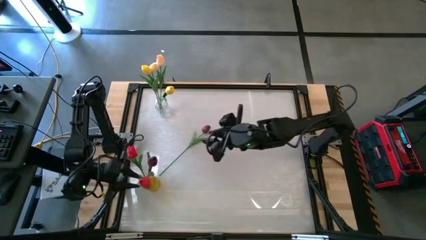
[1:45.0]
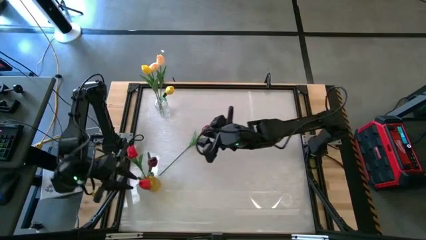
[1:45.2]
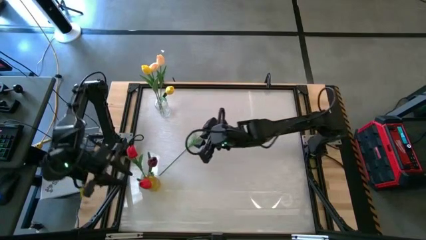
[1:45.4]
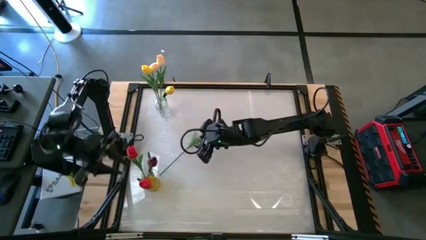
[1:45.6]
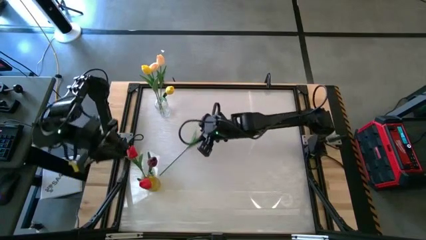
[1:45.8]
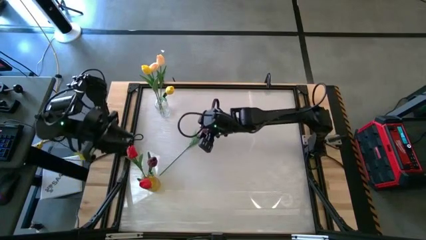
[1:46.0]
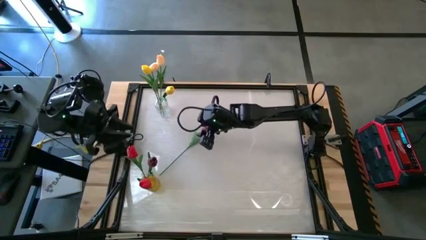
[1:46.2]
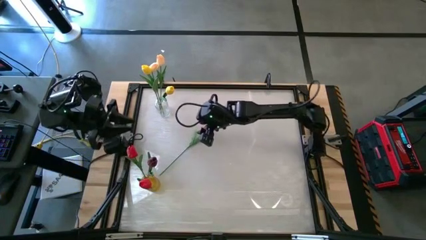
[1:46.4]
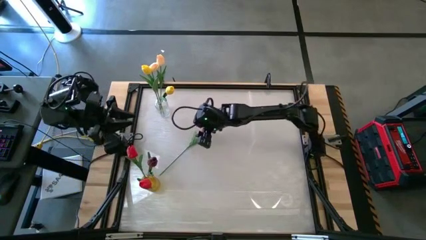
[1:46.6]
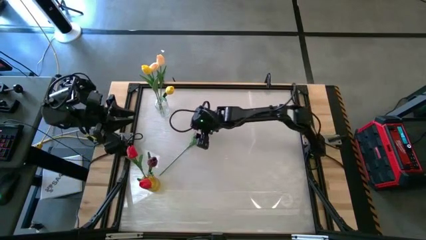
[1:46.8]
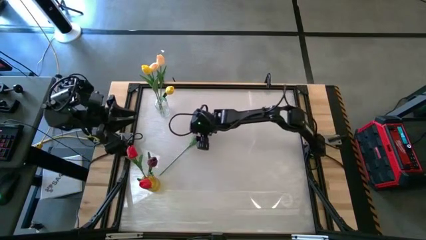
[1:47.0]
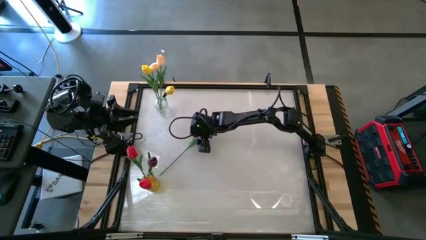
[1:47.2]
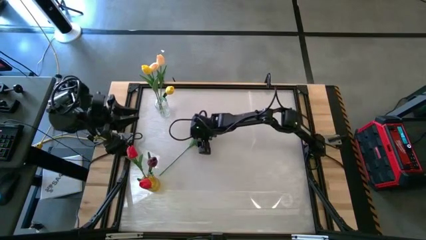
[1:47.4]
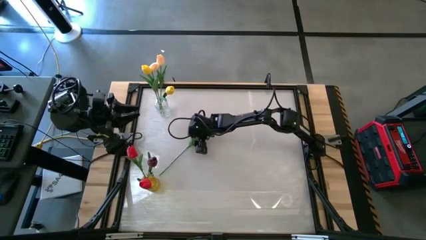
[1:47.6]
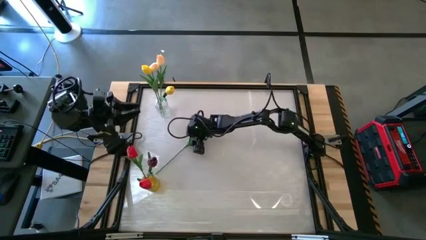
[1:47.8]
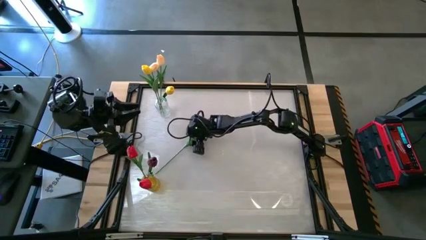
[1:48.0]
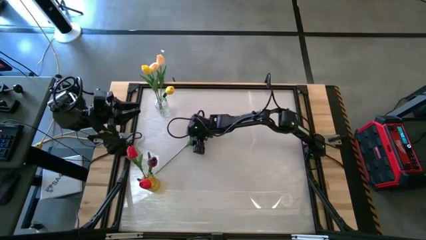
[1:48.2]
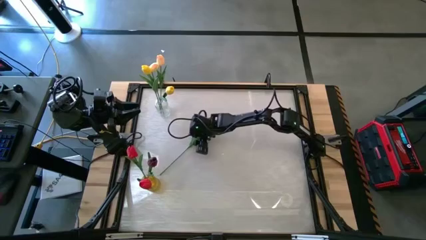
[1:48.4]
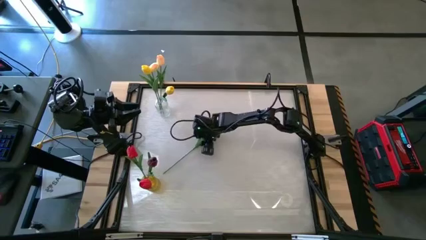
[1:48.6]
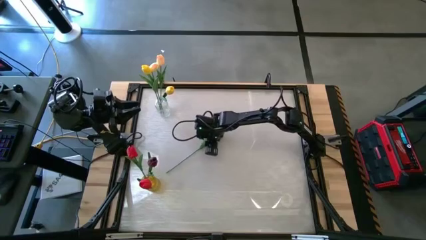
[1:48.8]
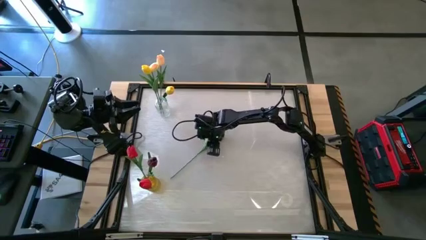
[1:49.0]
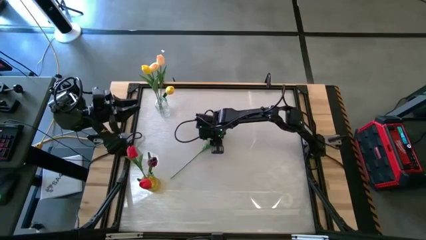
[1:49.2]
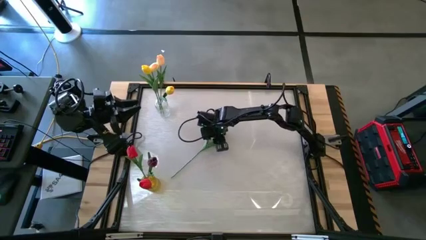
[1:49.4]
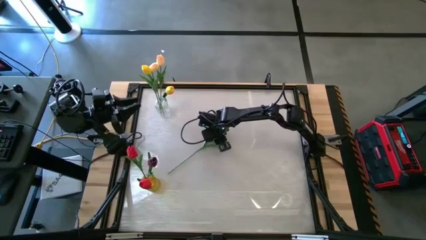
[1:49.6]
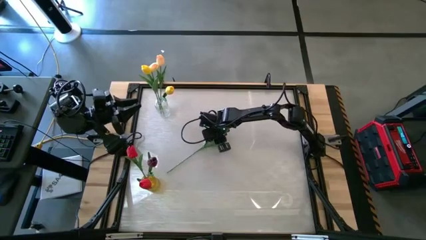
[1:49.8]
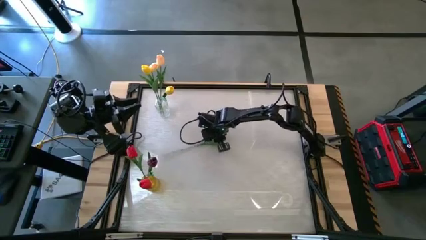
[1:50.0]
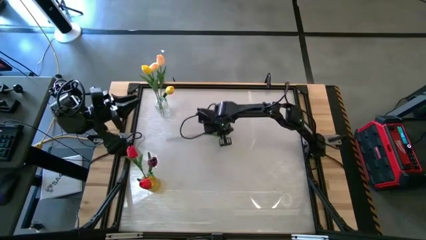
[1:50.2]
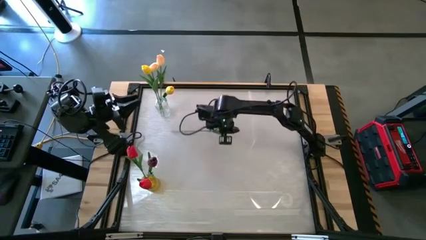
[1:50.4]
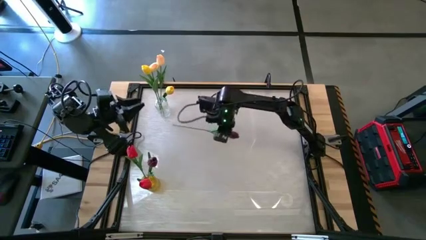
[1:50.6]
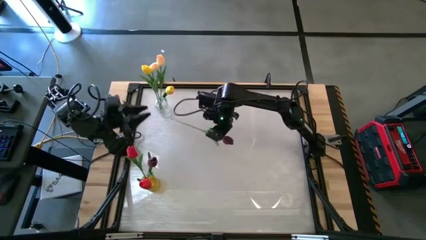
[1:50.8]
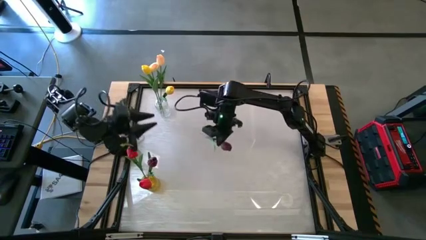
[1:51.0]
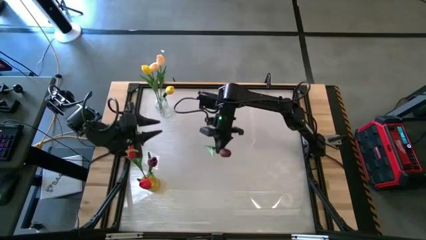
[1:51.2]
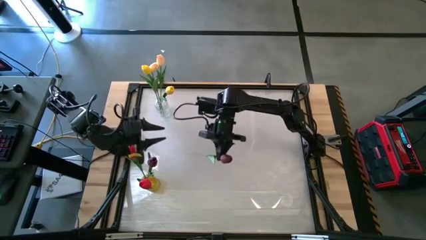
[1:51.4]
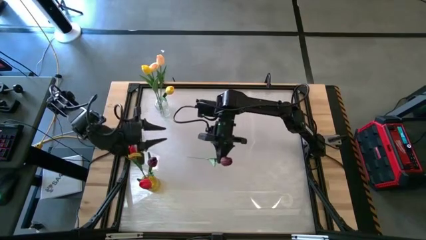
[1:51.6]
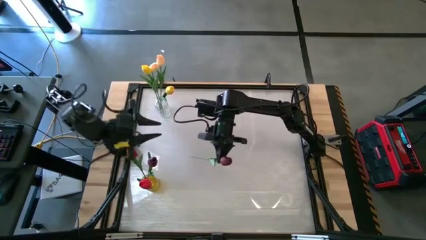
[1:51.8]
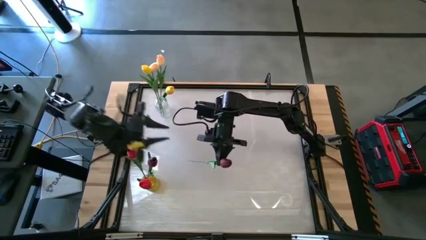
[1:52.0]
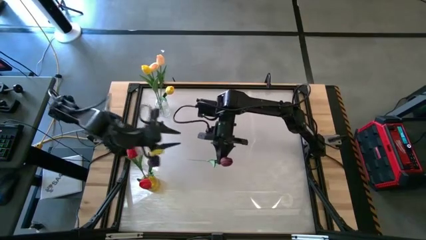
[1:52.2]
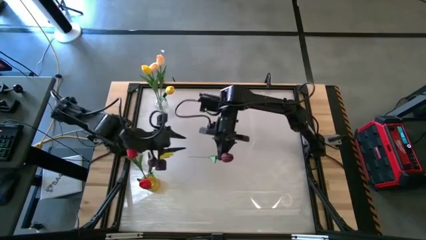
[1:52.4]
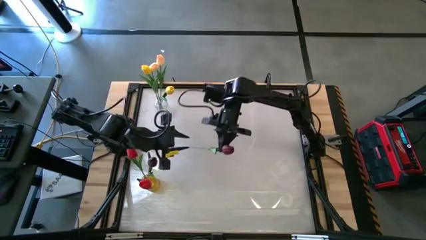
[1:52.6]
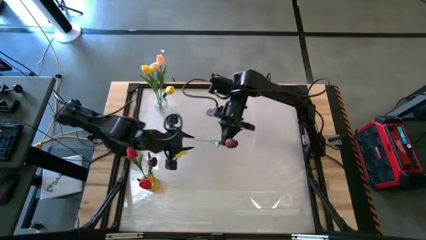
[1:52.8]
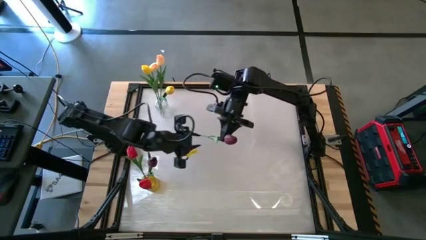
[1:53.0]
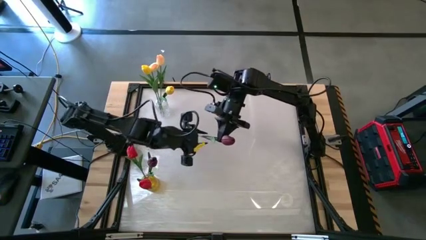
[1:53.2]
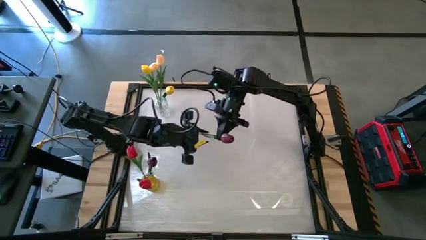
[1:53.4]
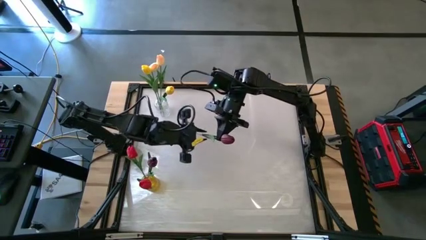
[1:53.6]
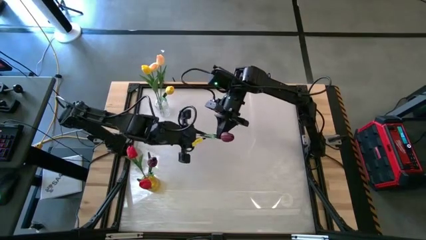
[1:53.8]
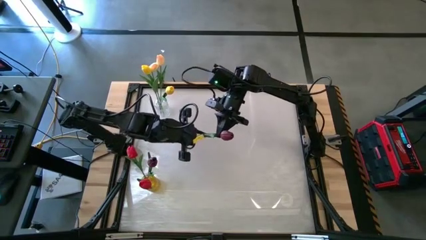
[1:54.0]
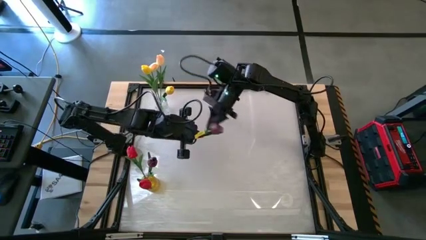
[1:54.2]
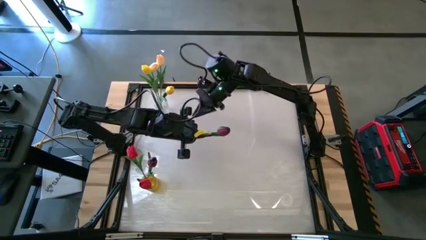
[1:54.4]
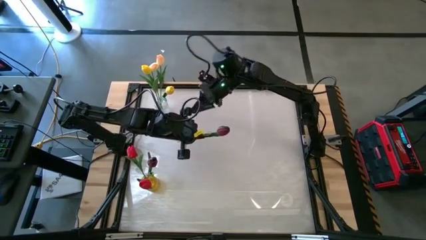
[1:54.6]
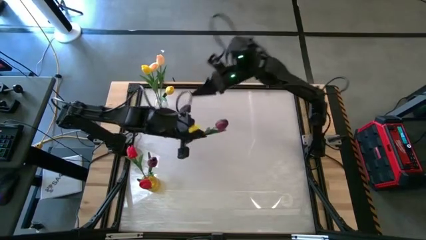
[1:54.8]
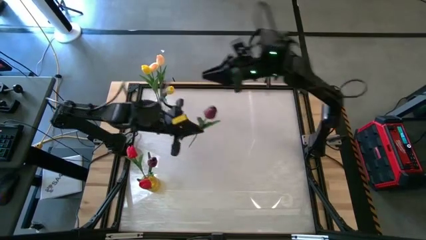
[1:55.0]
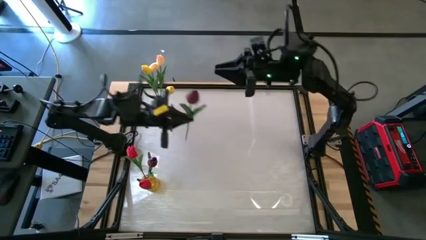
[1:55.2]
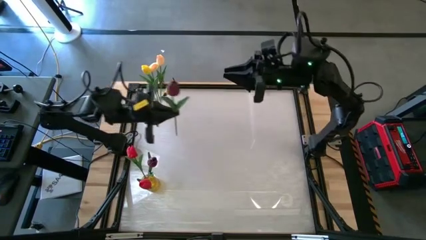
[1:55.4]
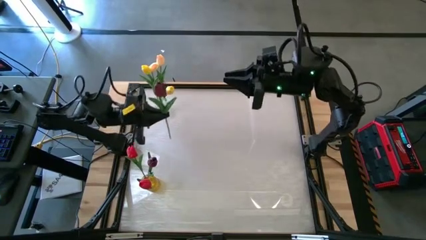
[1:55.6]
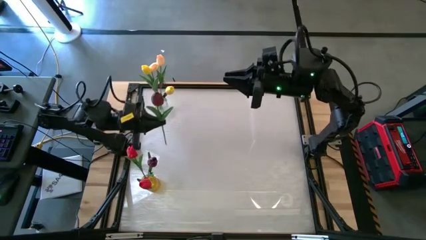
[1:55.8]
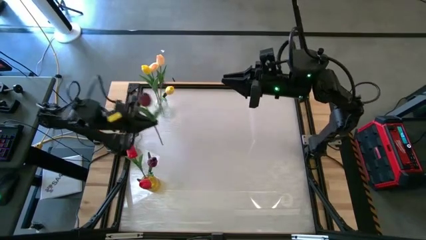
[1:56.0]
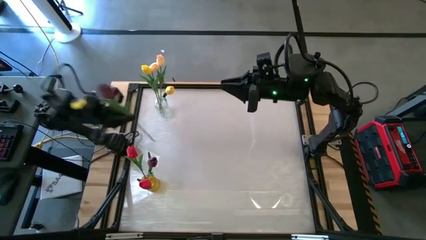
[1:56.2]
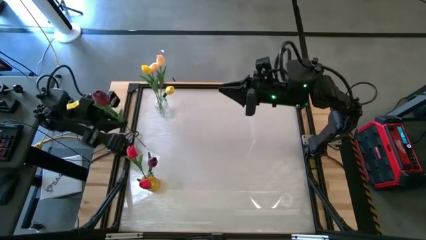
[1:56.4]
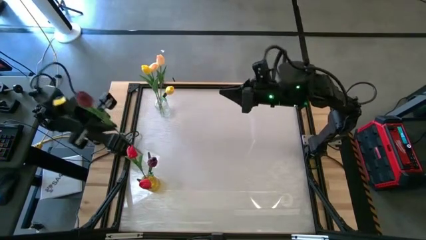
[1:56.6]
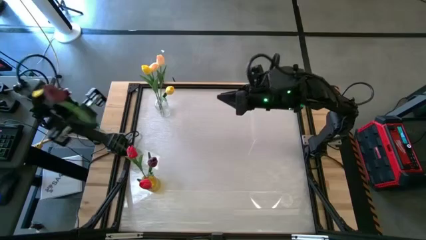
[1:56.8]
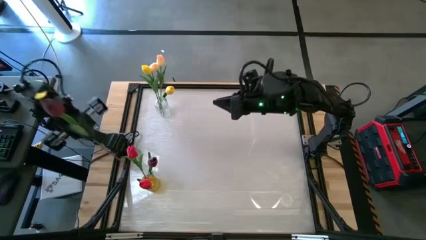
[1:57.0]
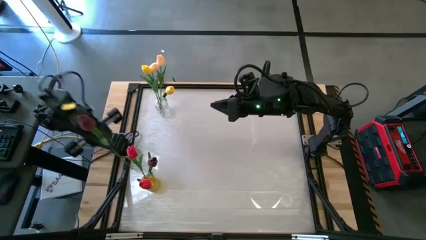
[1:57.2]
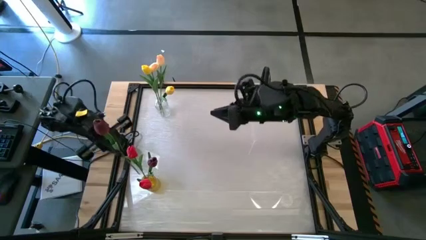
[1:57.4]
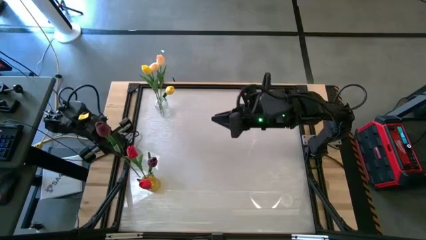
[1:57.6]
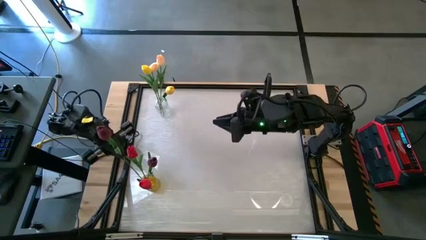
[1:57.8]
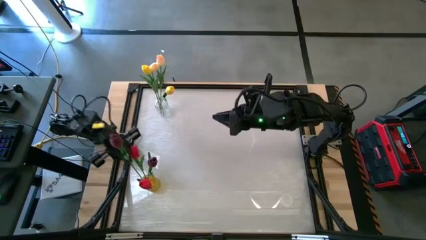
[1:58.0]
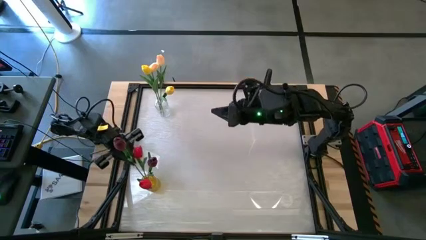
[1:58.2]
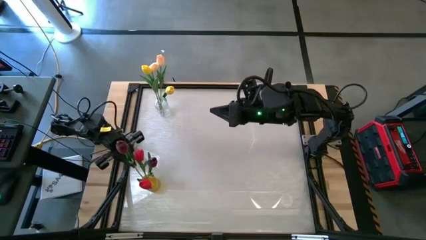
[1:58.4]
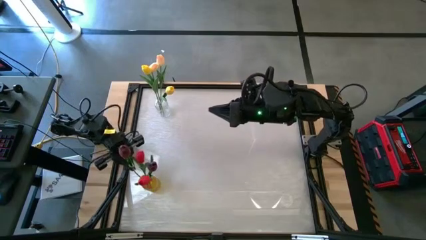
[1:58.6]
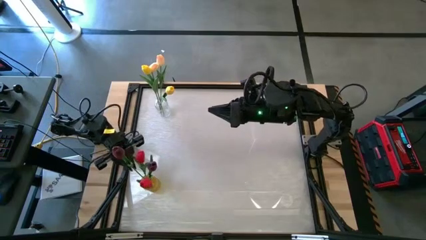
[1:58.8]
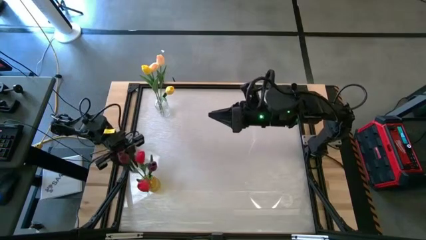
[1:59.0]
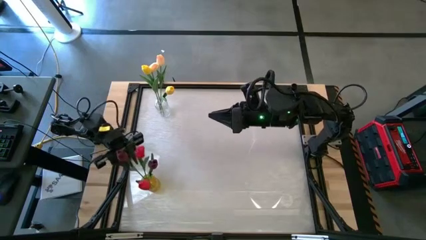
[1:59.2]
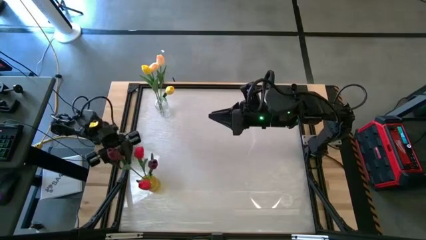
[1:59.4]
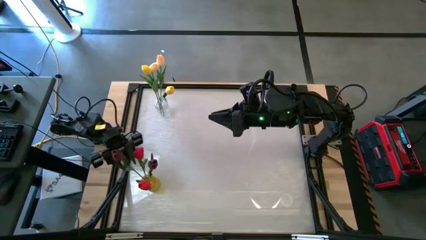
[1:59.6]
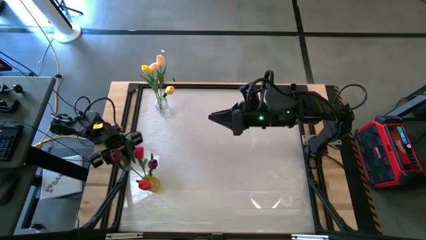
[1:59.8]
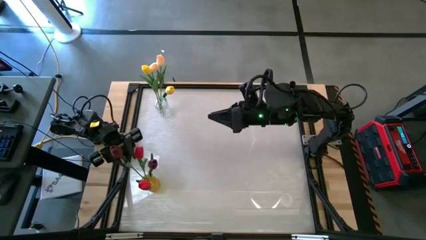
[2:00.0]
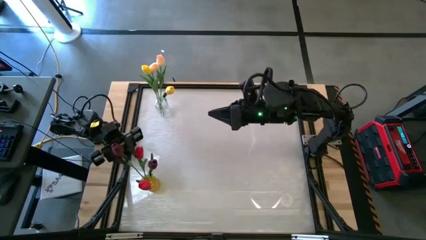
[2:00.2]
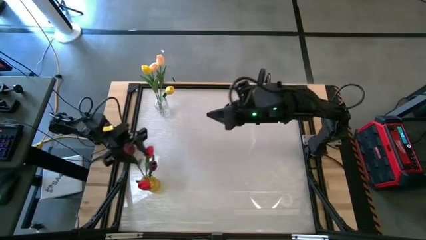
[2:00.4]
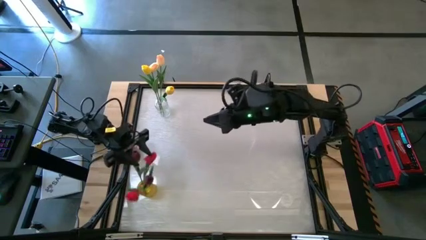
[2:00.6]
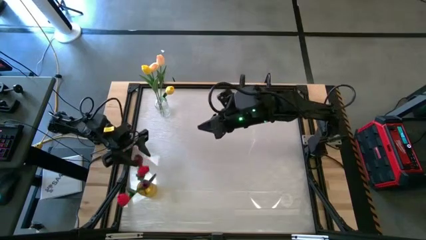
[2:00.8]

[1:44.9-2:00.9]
Task: Sort flowers into vase by color
Put the dark red tulip into the orange vase
